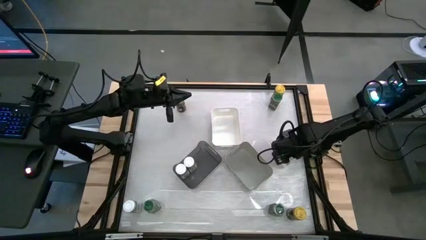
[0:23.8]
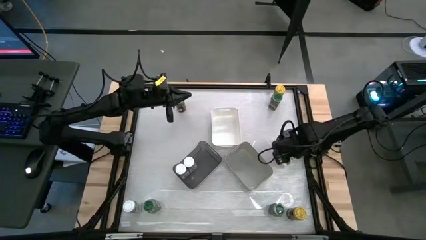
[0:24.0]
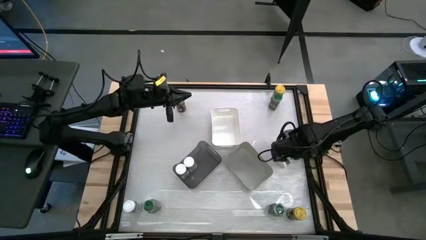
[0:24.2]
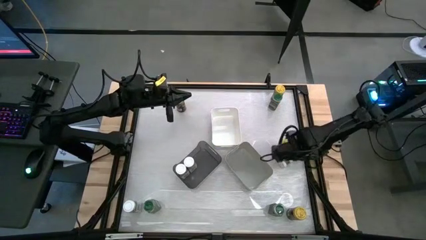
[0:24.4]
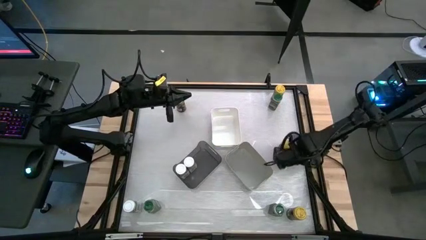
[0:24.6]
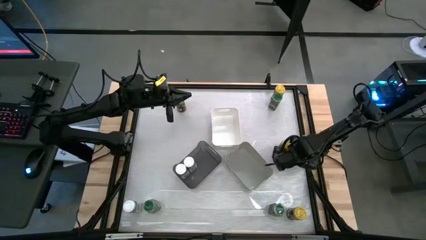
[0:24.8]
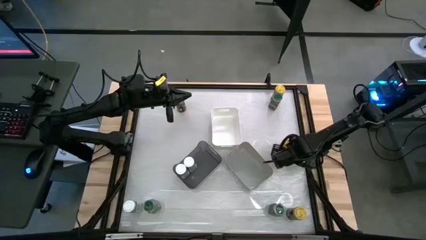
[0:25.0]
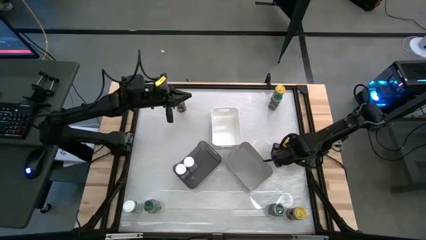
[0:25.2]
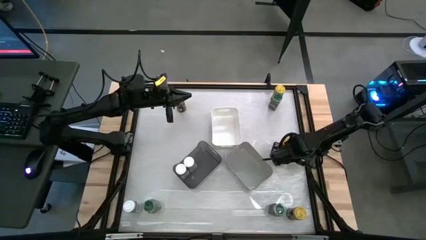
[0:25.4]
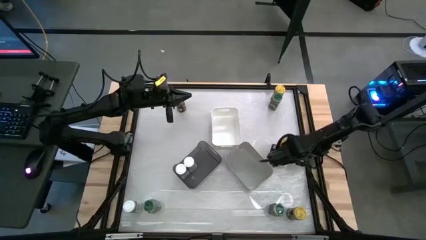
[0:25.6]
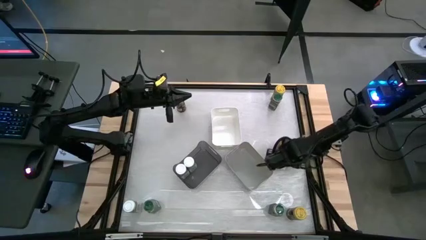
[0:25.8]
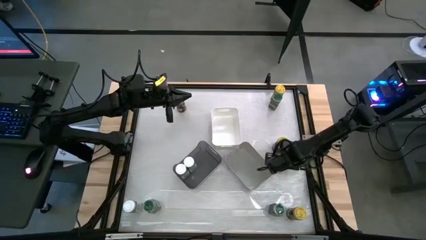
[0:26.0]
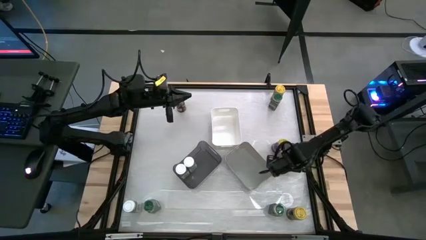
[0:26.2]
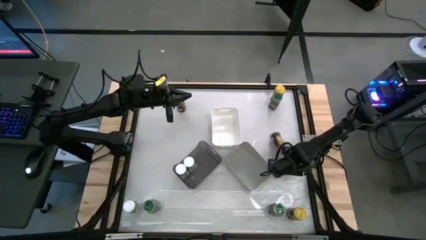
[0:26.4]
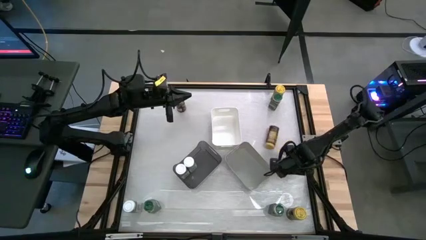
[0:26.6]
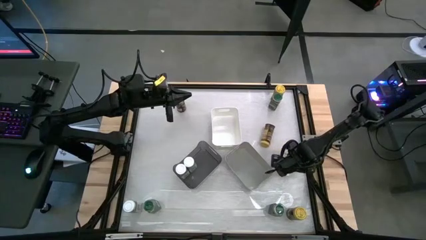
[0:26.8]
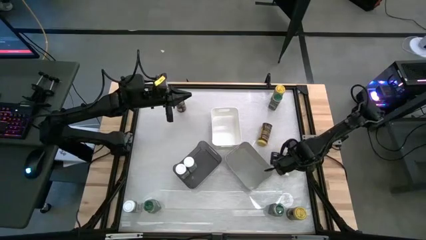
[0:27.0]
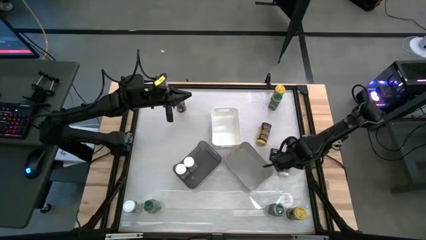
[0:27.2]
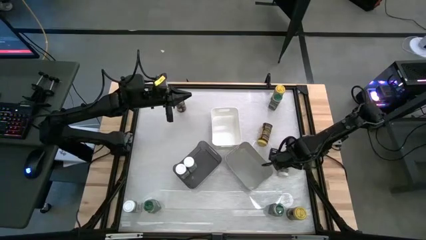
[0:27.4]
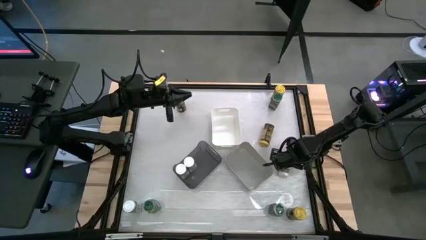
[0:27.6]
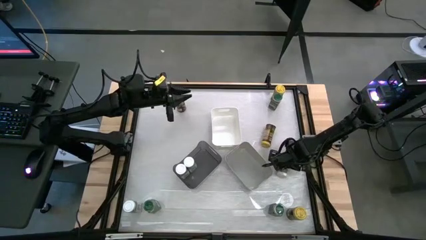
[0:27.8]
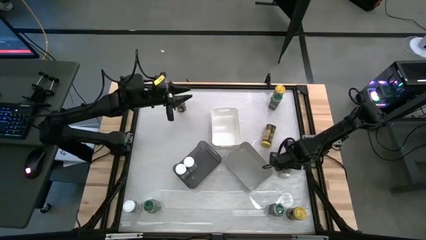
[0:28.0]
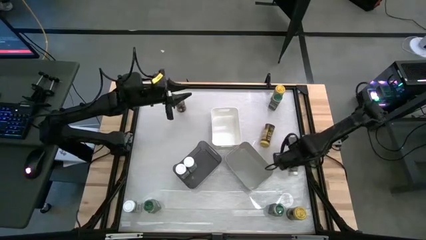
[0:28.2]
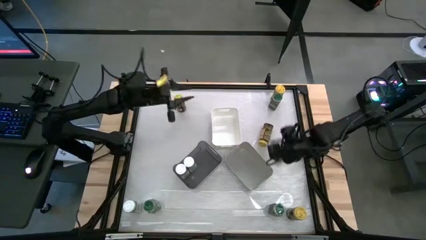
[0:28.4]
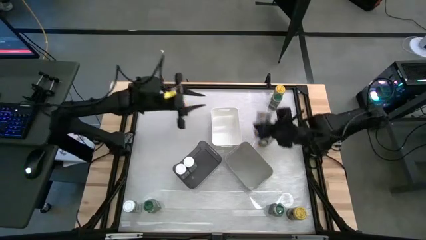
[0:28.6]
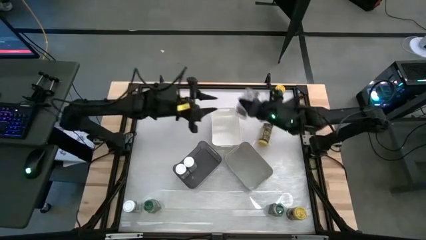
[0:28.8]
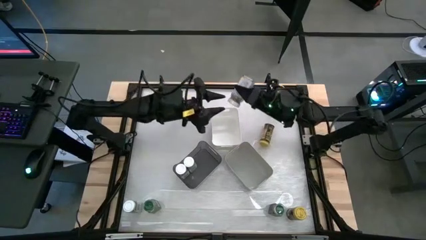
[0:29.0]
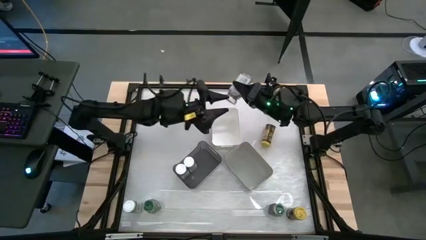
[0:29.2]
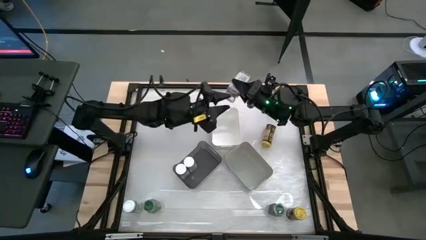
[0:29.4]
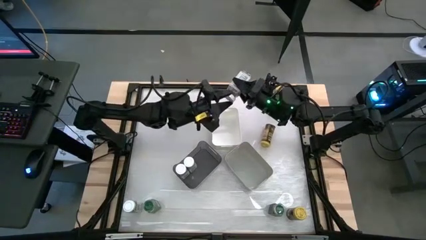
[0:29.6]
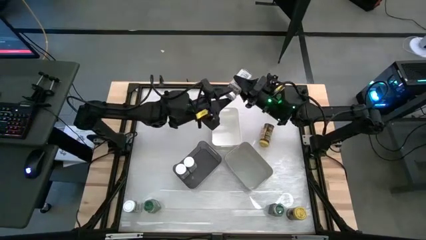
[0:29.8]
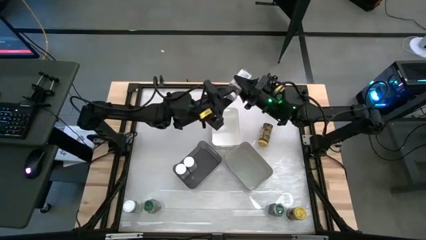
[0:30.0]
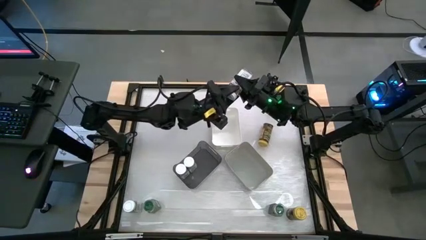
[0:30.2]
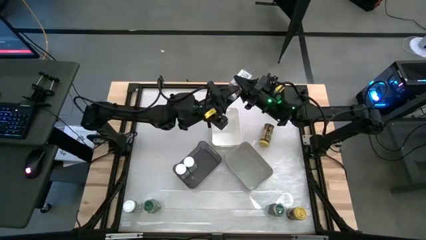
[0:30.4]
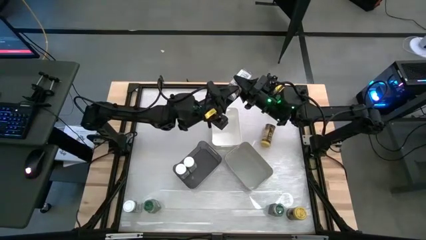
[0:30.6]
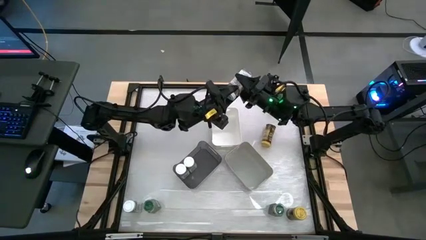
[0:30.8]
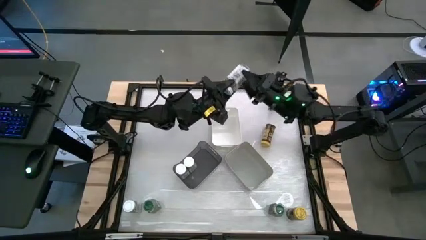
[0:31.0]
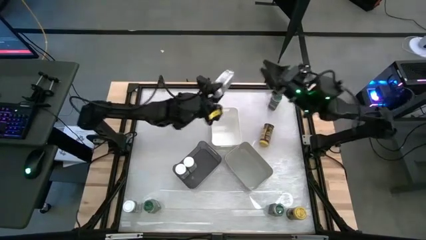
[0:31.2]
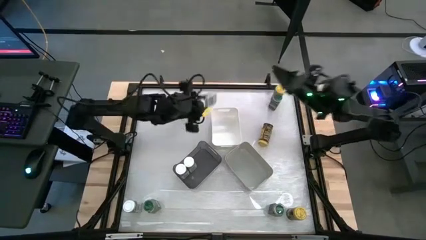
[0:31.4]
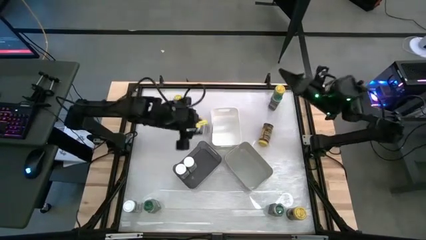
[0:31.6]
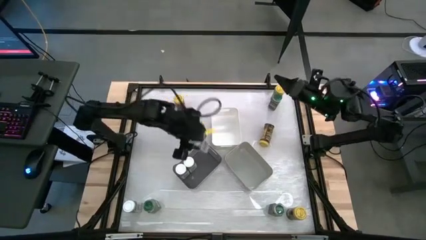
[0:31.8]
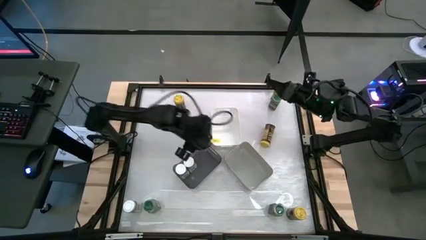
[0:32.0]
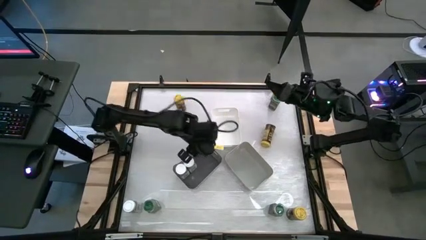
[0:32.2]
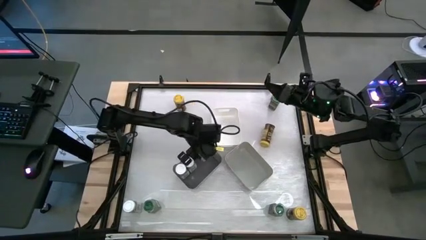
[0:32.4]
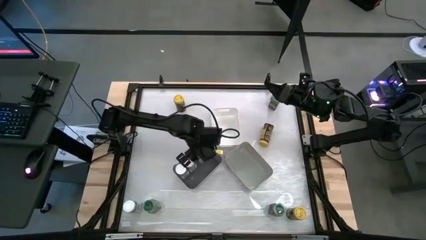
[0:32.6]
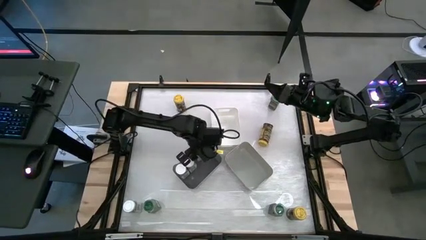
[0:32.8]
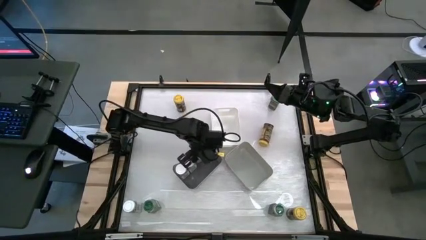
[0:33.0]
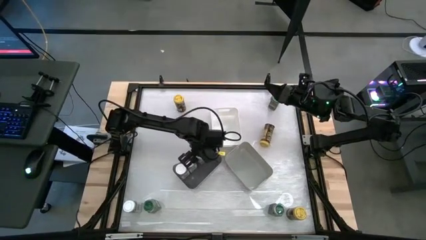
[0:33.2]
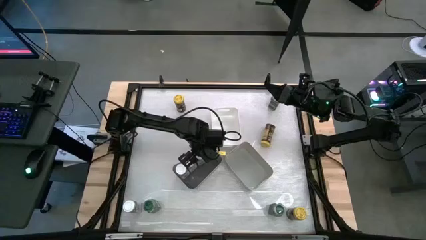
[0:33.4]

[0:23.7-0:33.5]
Task: Sort spices by type
Put the white seasoning bottle into the black bin

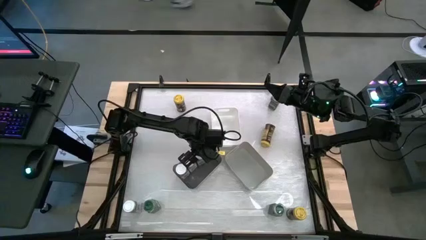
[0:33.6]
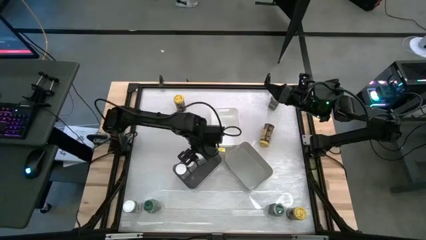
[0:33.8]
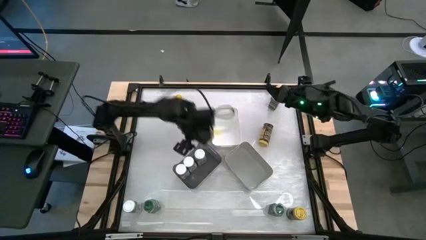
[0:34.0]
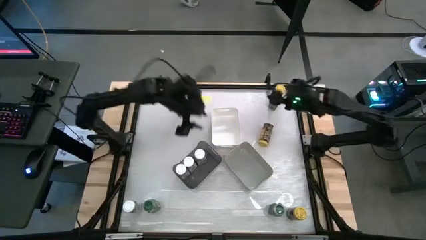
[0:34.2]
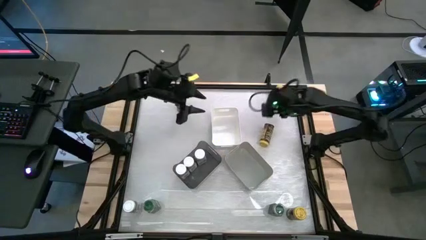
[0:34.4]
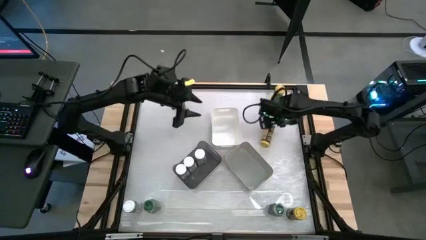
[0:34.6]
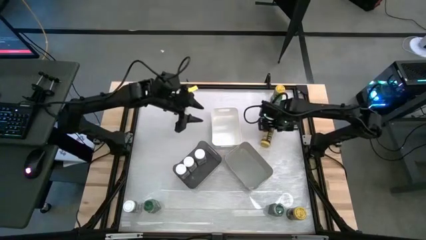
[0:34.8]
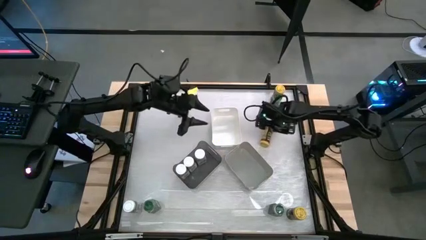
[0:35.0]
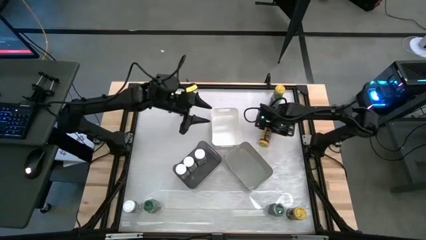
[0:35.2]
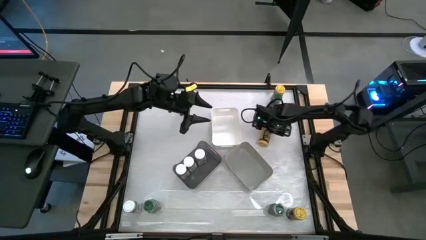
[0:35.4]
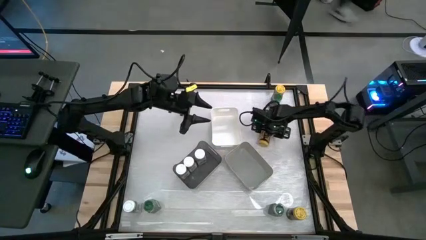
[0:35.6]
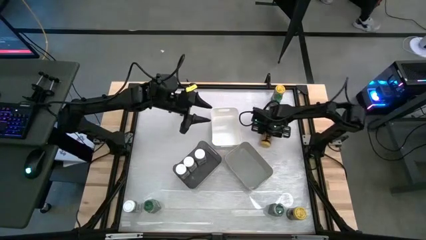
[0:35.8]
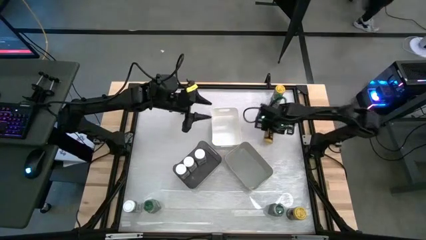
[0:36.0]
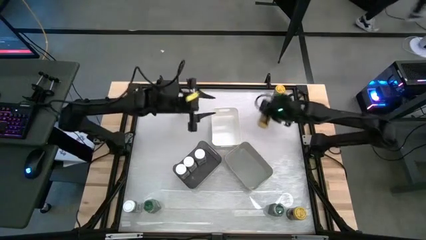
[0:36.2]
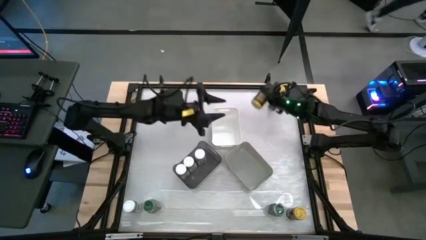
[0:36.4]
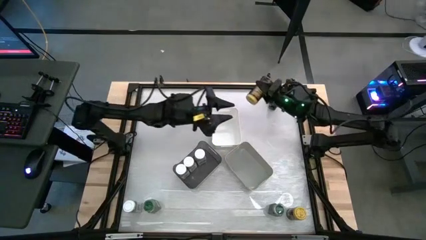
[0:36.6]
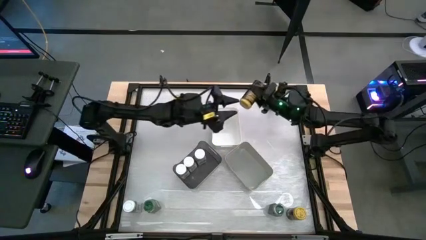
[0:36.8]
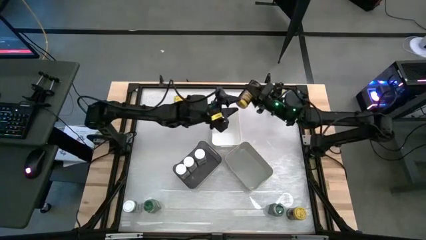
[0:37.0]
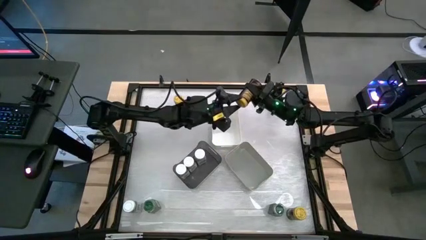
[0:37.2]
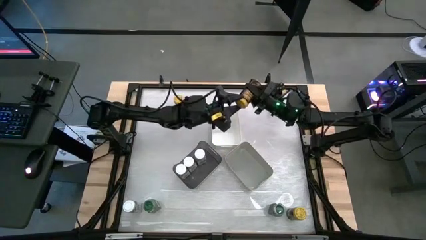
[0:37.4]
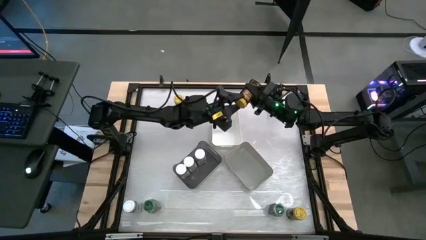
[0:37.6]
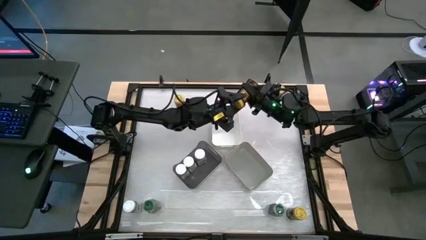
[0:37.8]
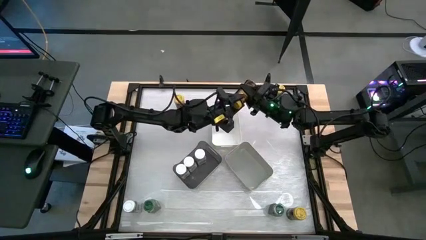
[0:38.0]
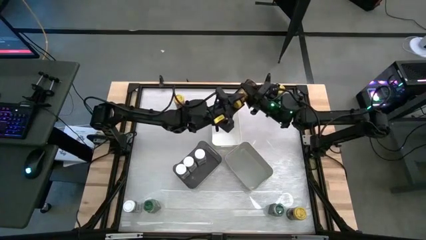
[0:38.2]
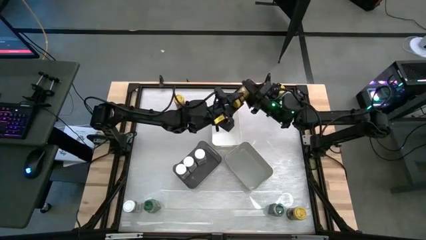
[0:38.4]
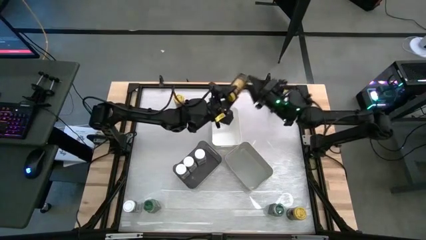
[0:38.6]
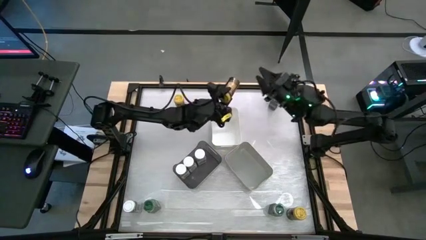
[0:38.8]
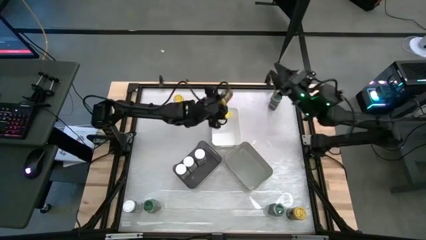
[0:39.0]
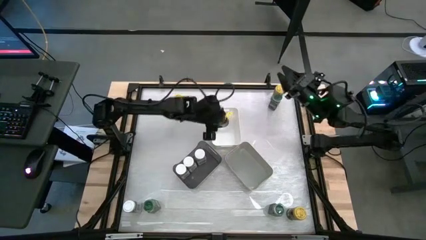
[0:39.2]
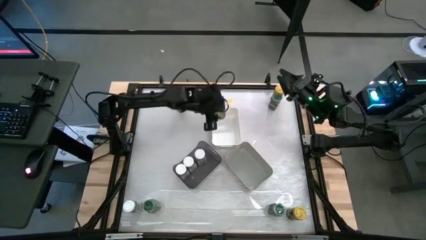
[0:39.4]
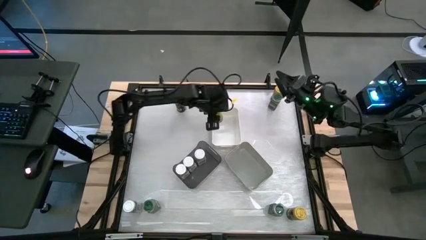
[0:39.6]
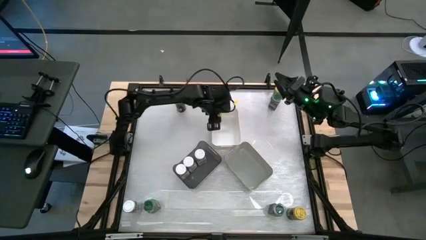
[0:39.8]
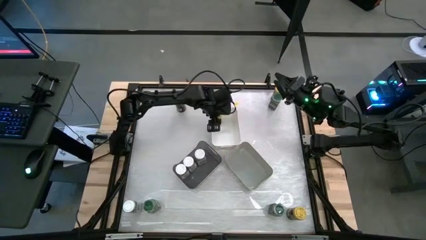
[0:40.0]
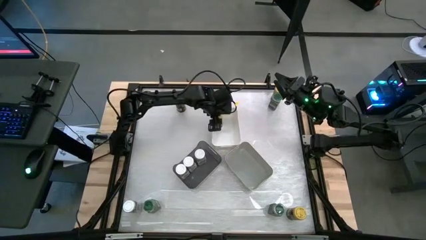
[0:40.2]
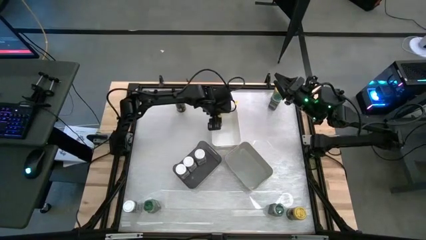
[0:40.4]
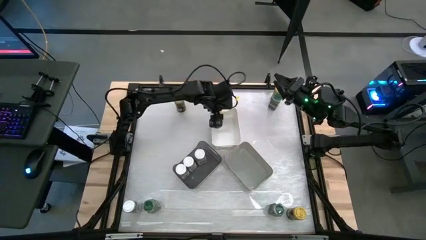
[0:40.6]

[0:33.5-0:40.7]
Put the yellow seasoning bottle into the white bin
